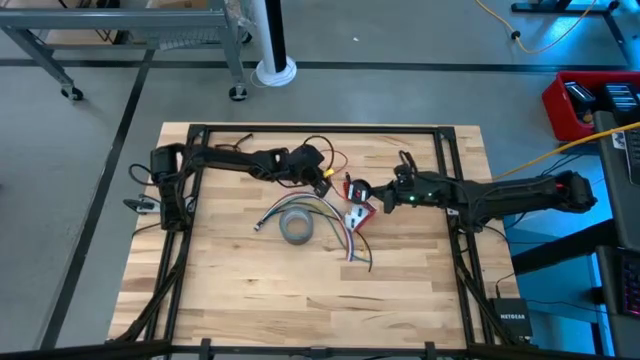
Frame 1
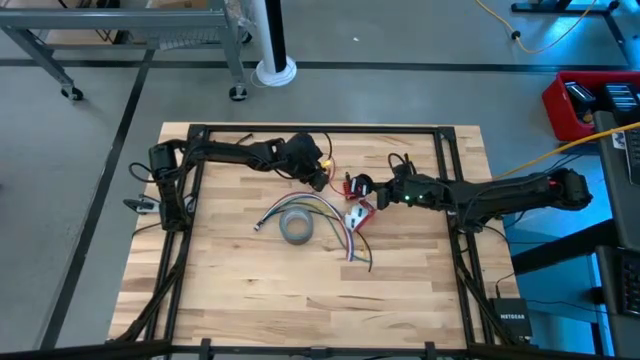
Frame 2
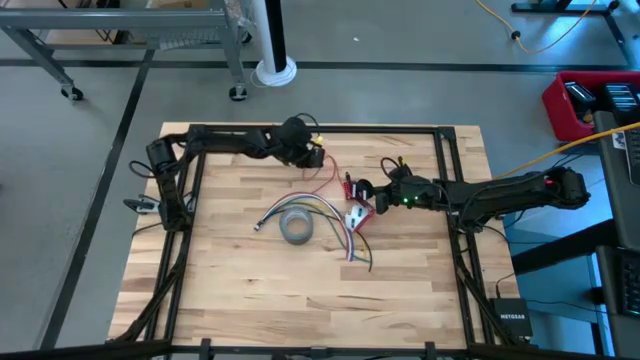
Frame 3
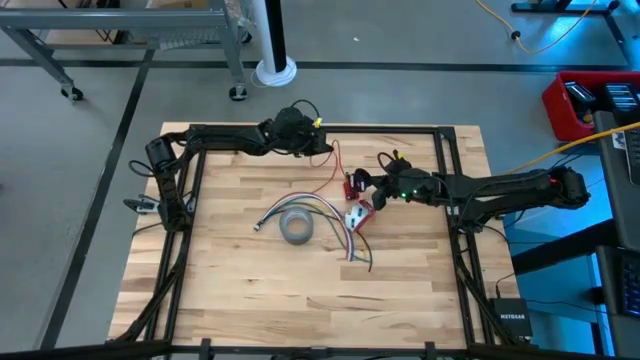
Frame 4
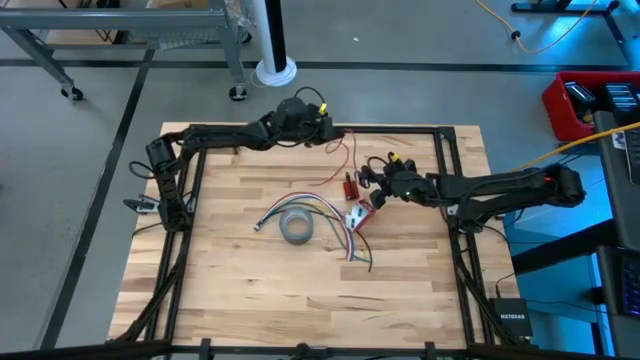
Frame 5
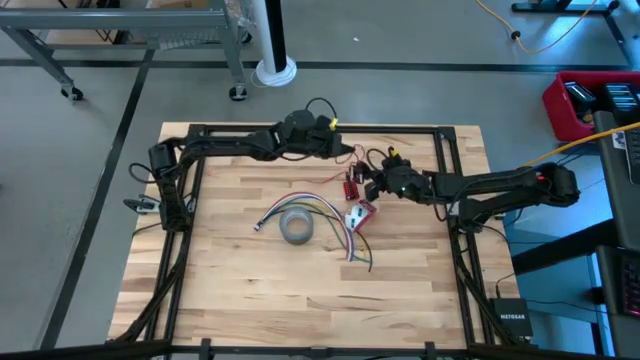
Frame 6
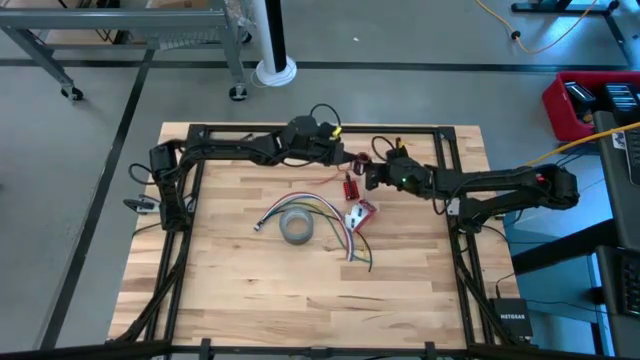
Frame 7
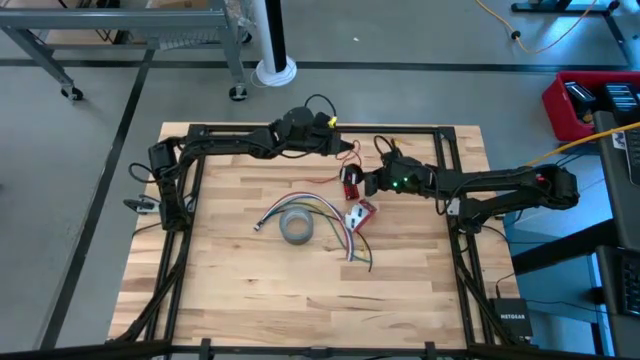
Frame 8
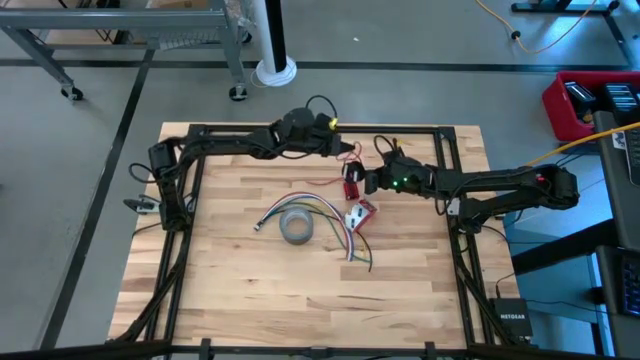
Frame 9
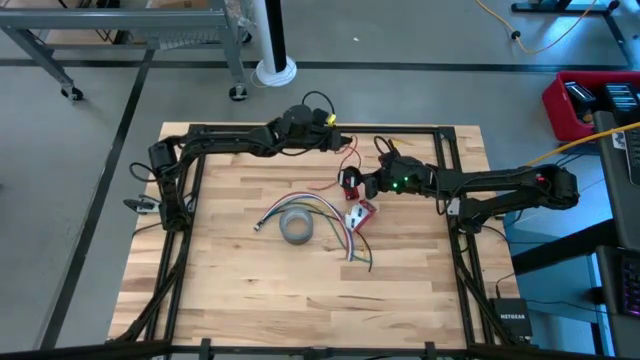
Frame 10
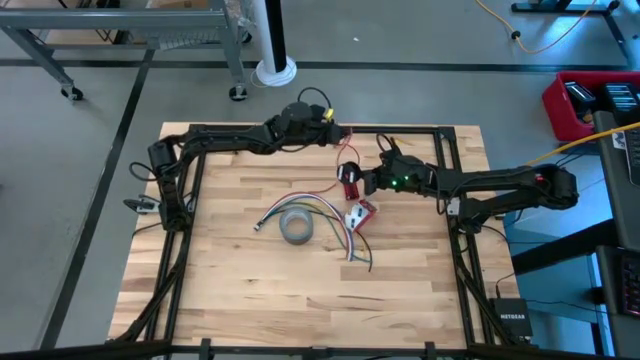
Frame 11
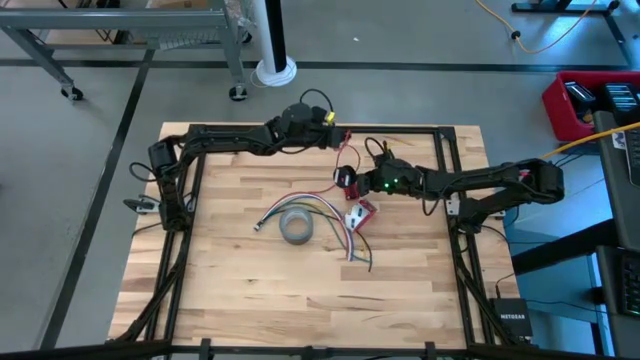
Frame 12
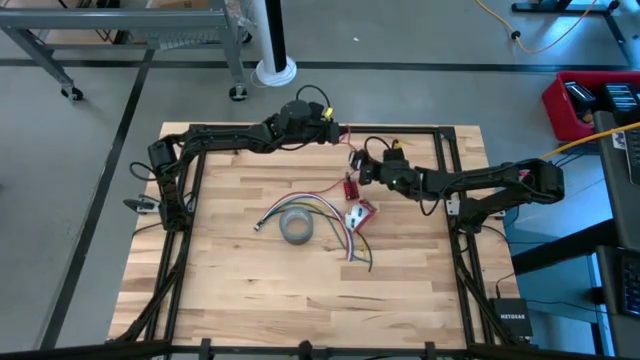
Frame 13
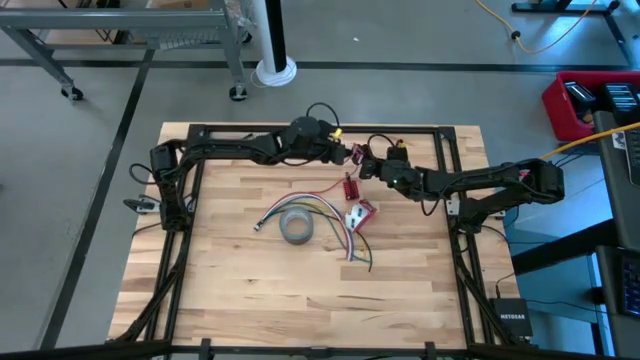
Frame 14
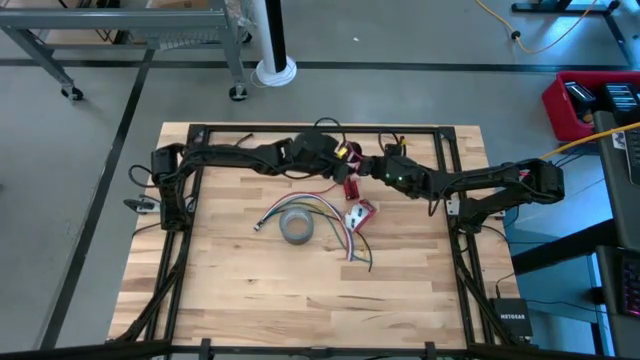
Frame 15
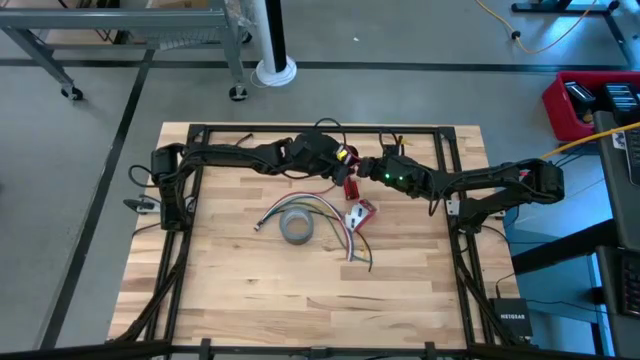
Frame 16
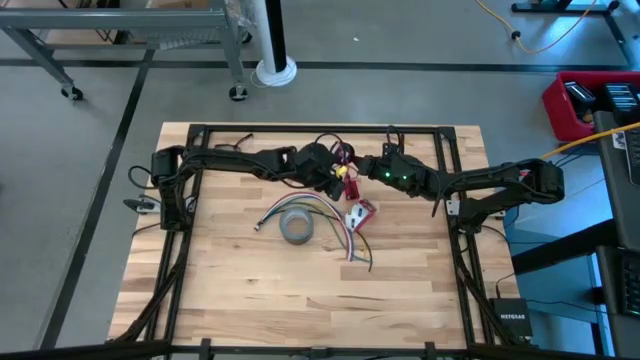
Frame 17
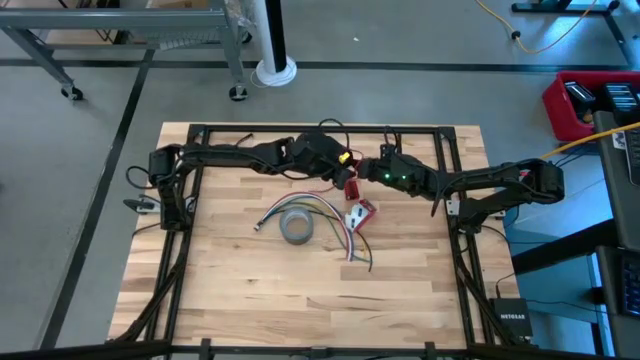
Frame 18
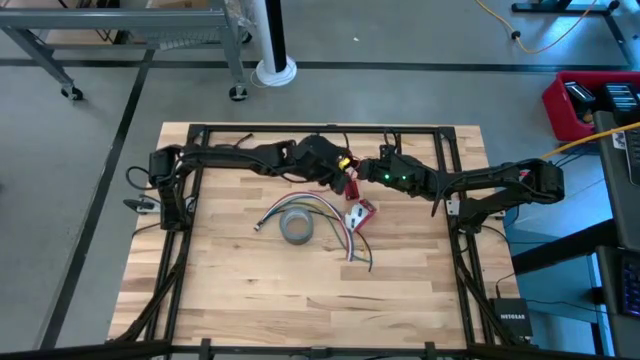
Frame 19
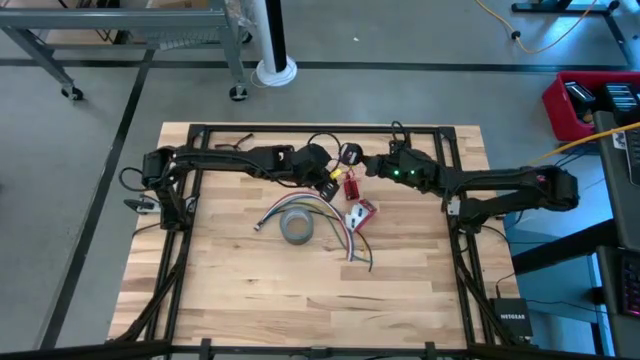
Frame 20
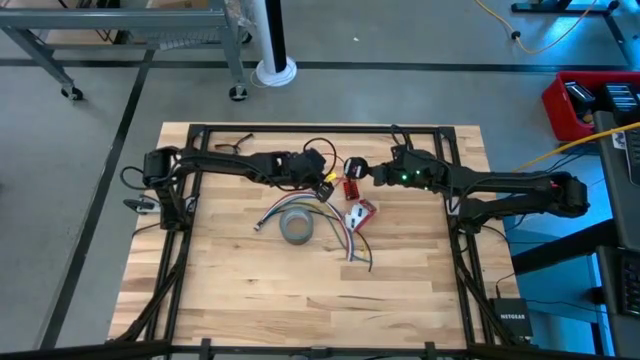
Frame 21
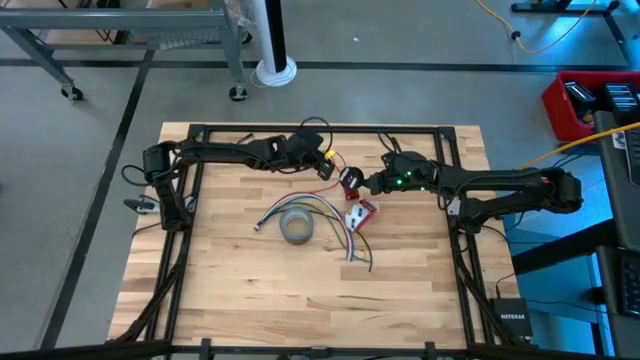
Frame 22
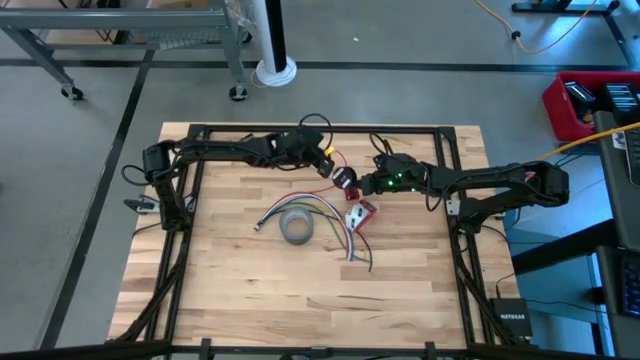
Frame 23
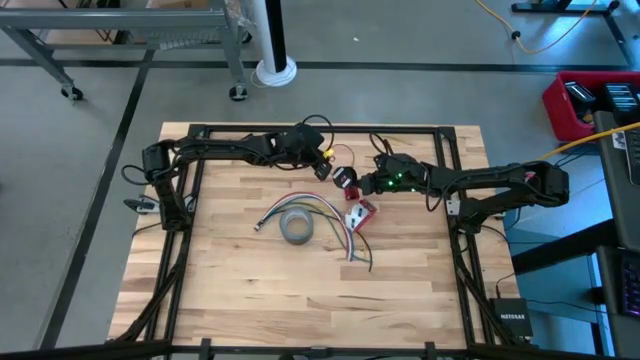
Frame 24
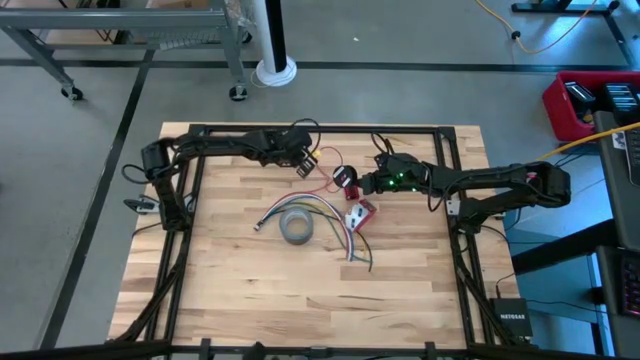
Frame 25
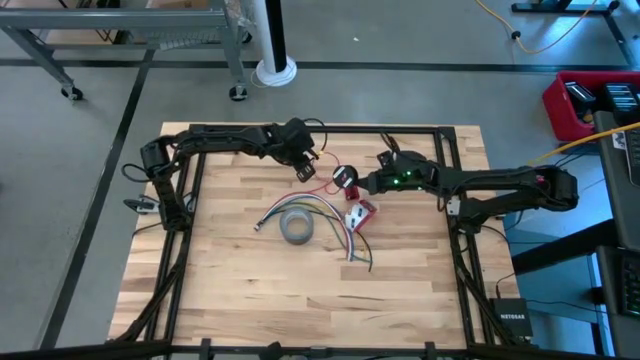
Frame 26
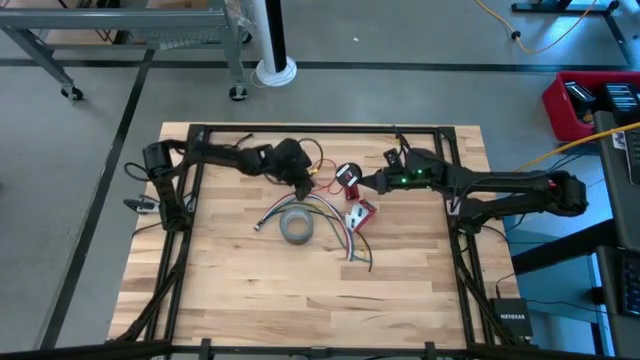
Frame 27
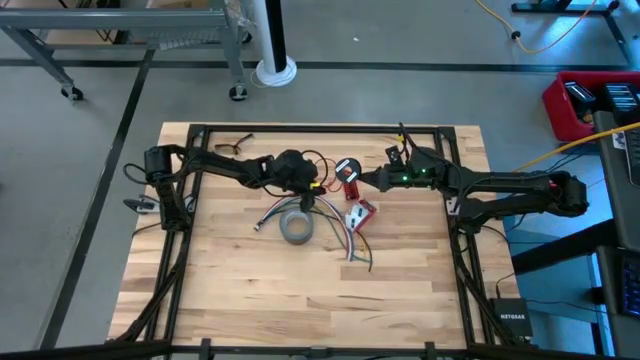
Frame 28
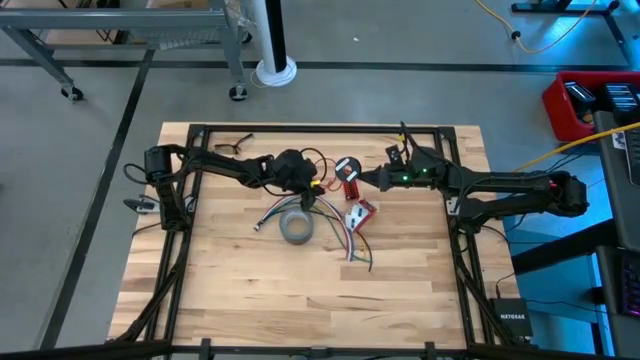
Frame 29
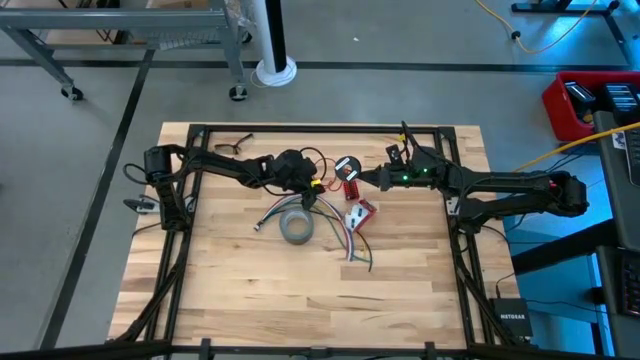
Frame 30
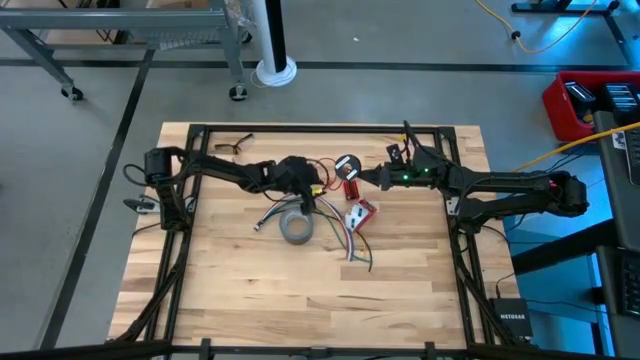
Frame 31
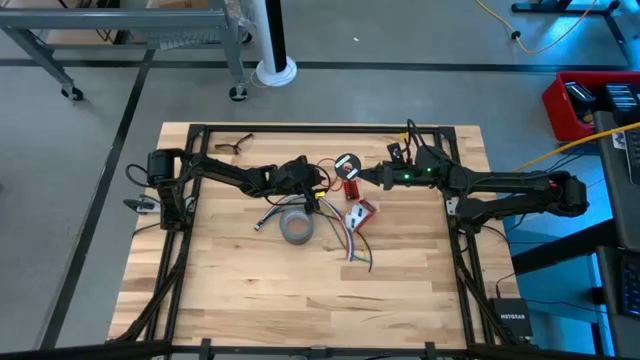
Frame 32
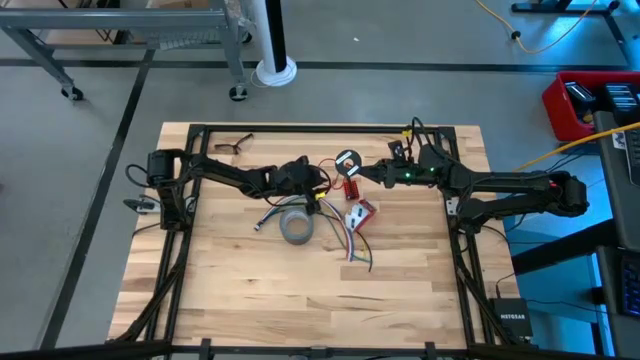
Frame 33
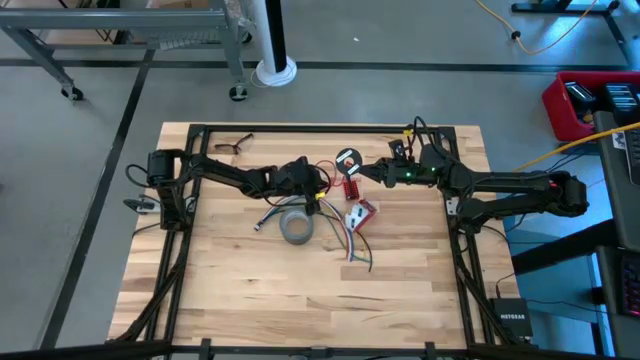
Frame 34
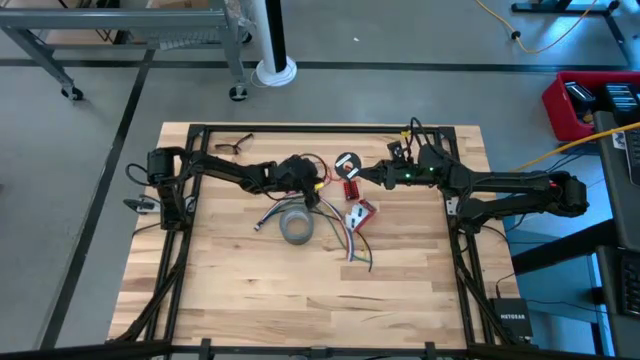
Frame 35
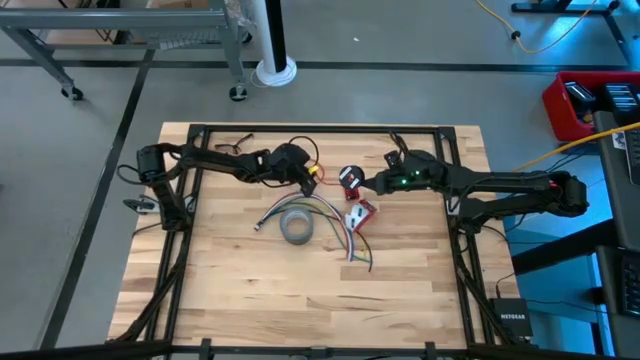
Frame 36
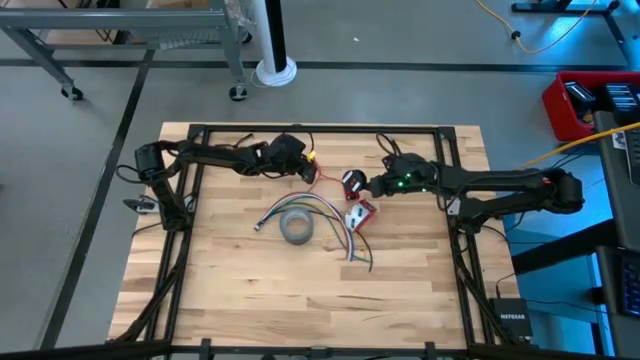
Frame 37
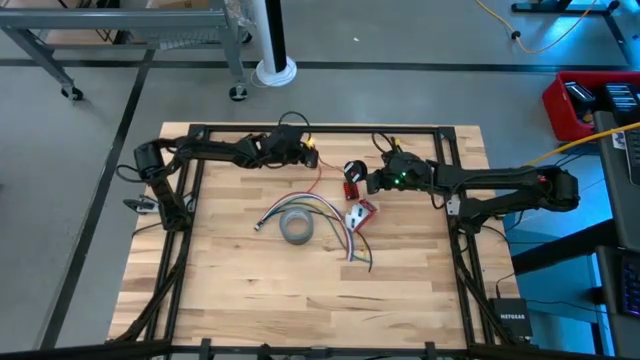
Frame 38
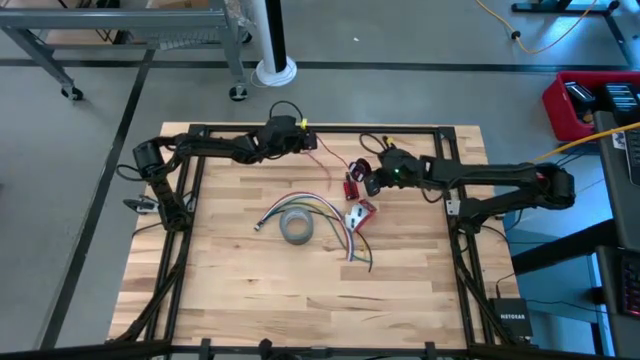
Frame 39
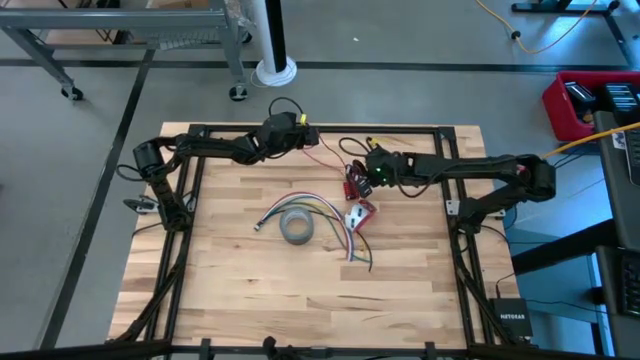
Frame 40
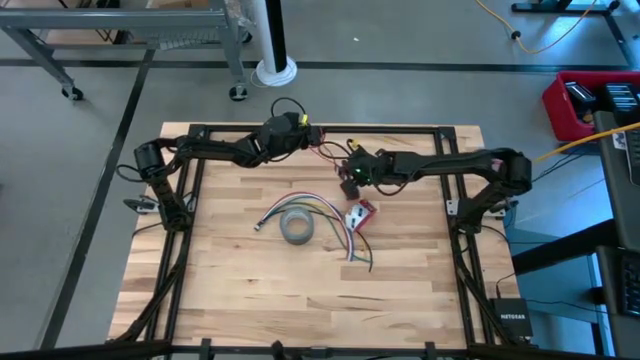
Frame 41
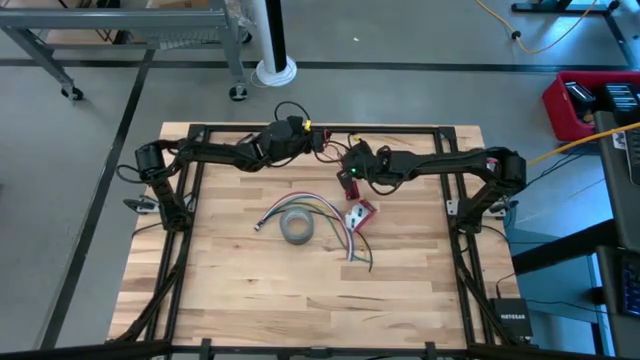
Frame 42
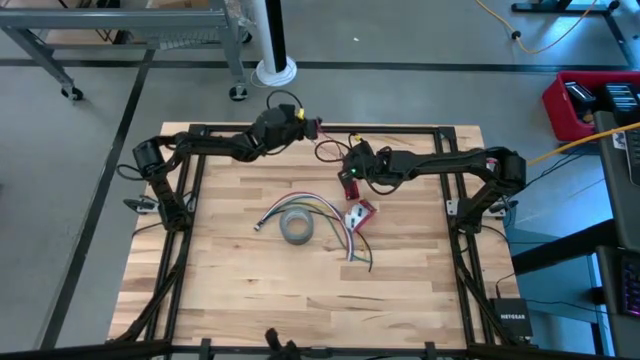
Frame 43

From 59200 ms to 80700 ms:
Task: Coil cords
Coil the red wire on the black spool
